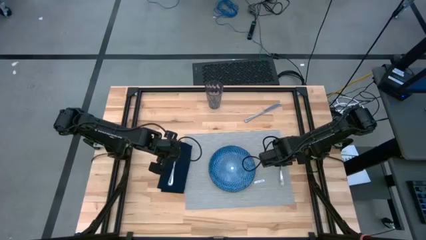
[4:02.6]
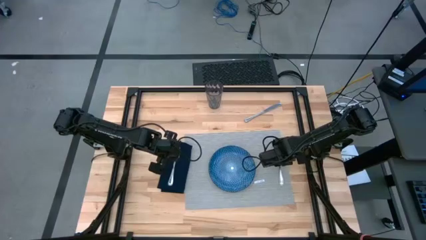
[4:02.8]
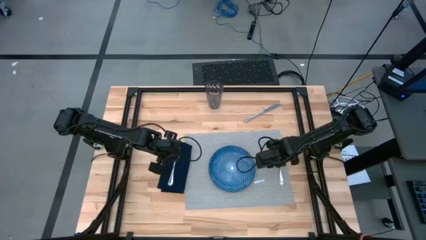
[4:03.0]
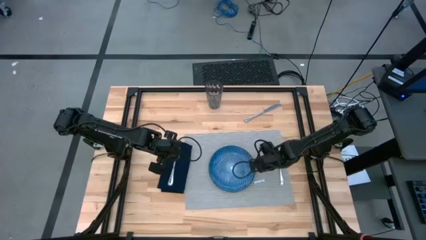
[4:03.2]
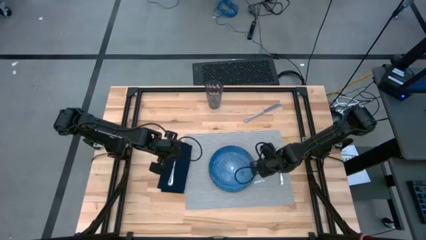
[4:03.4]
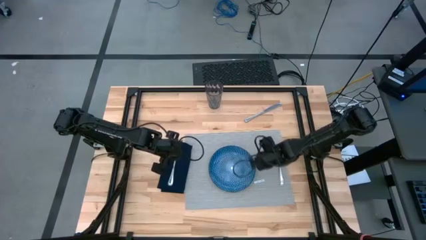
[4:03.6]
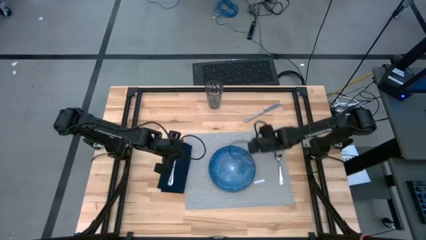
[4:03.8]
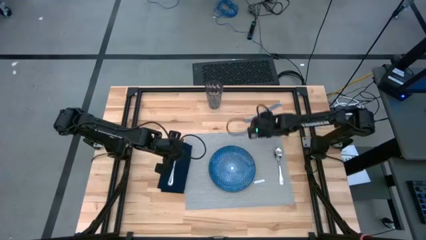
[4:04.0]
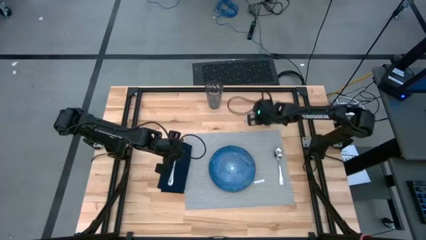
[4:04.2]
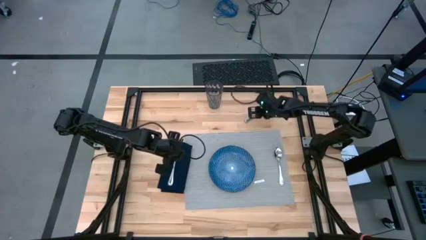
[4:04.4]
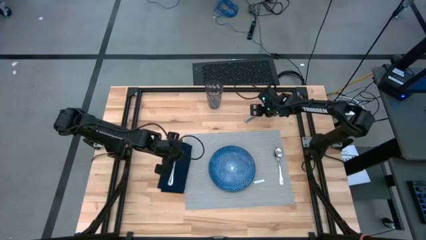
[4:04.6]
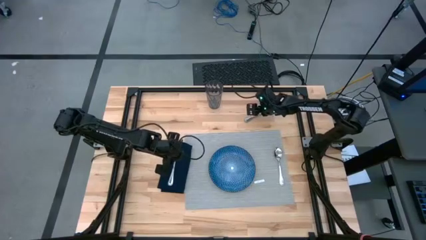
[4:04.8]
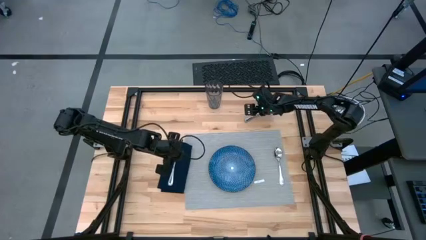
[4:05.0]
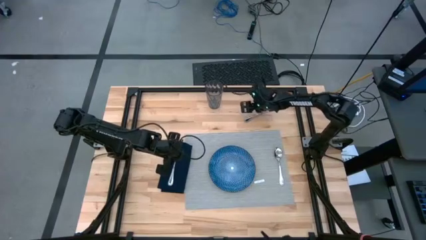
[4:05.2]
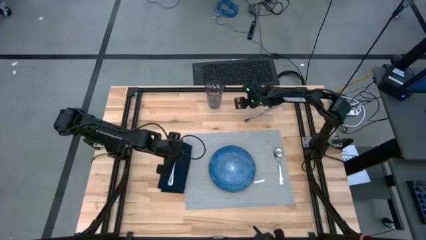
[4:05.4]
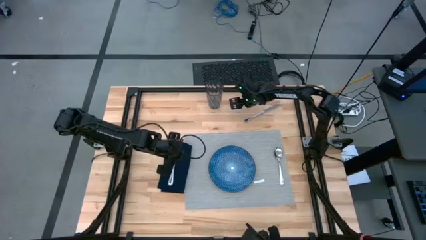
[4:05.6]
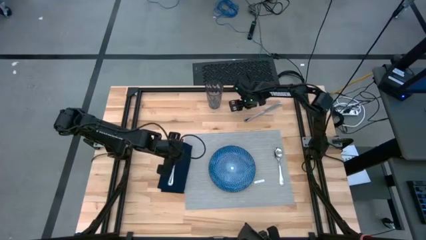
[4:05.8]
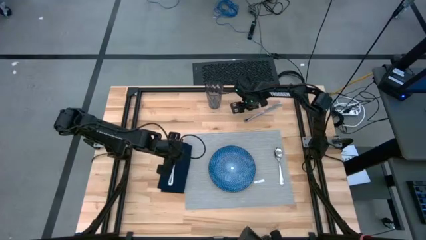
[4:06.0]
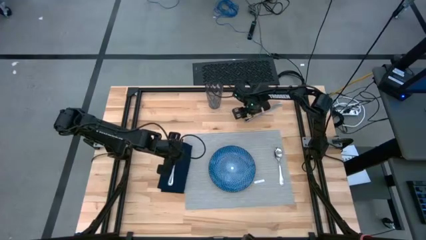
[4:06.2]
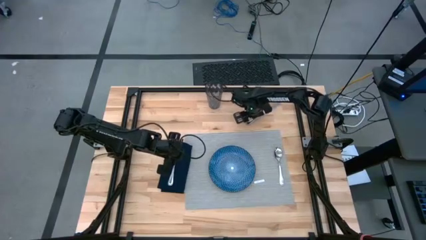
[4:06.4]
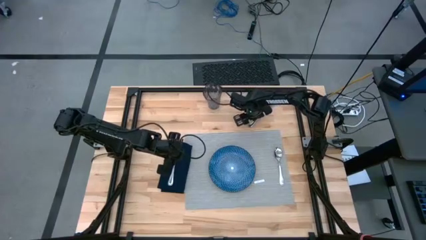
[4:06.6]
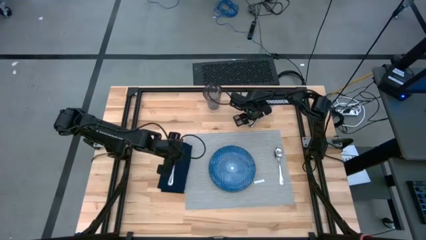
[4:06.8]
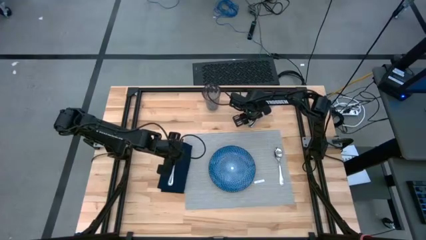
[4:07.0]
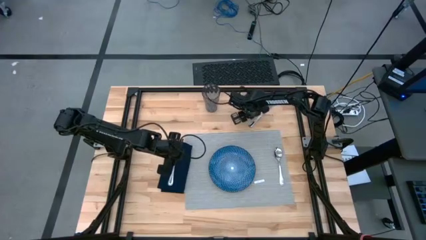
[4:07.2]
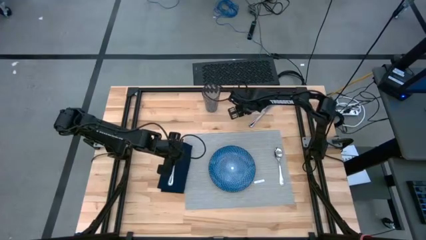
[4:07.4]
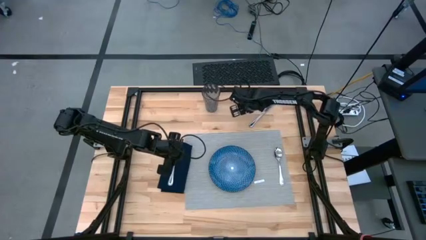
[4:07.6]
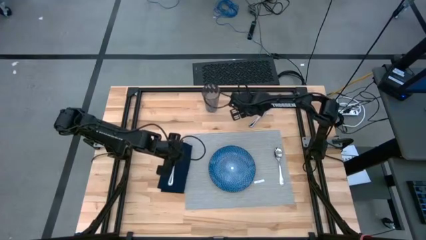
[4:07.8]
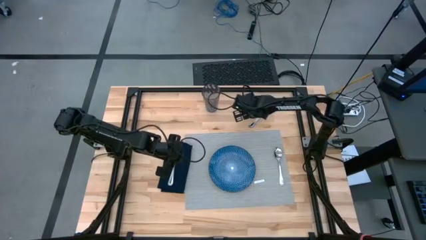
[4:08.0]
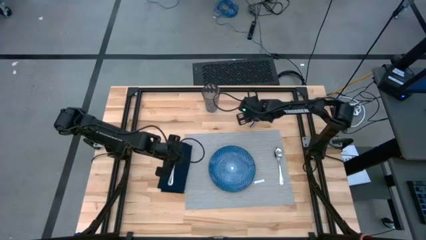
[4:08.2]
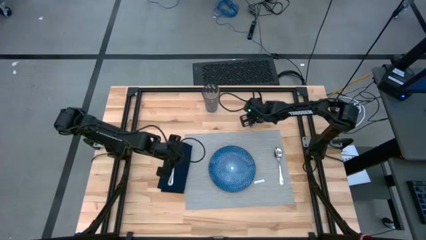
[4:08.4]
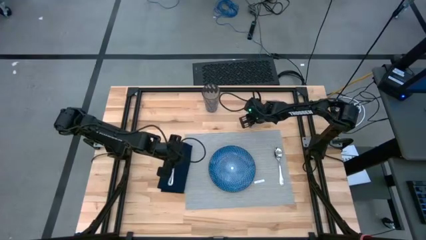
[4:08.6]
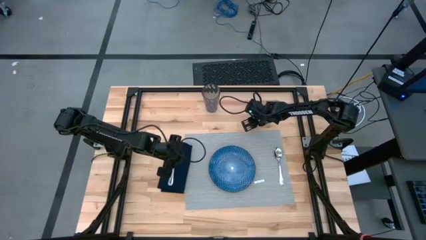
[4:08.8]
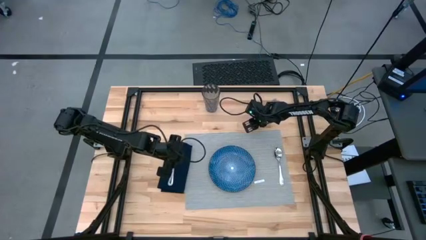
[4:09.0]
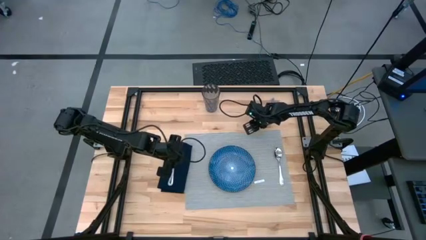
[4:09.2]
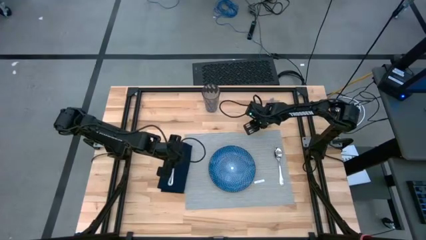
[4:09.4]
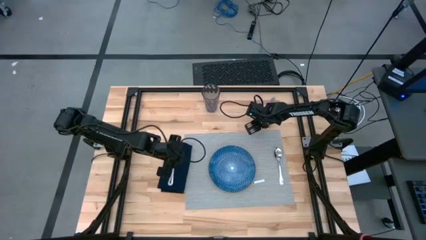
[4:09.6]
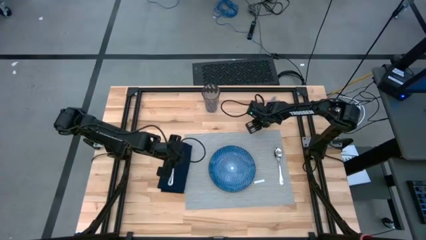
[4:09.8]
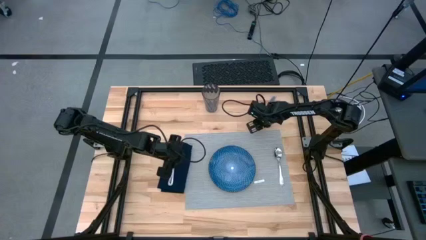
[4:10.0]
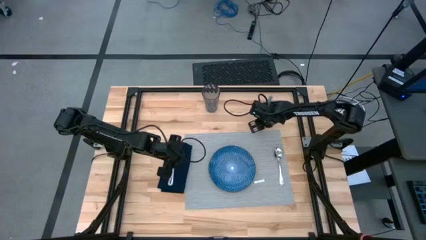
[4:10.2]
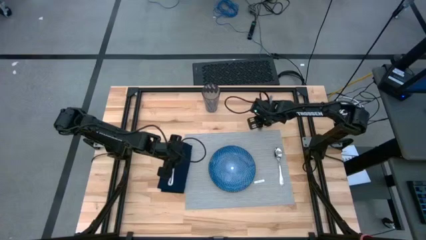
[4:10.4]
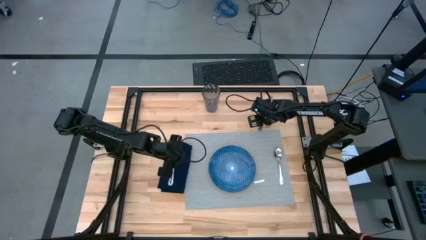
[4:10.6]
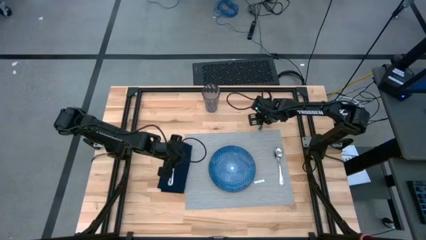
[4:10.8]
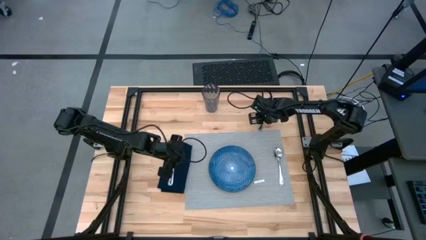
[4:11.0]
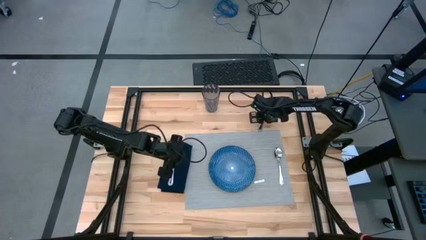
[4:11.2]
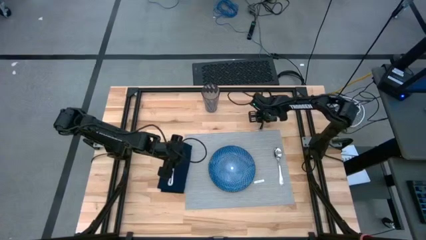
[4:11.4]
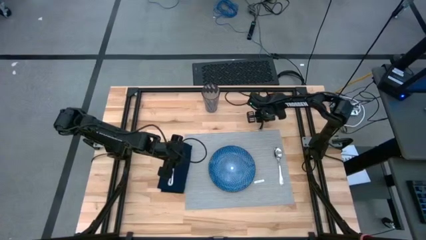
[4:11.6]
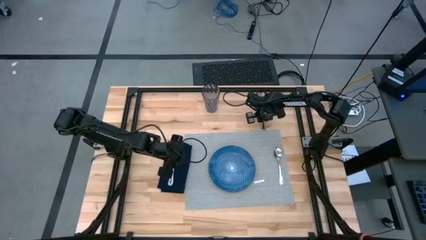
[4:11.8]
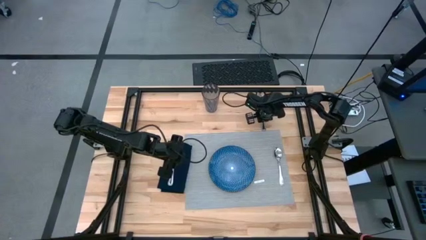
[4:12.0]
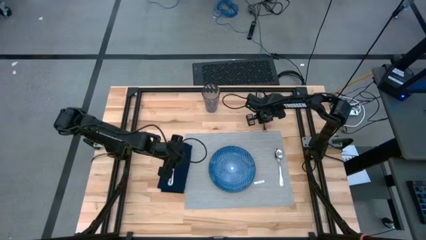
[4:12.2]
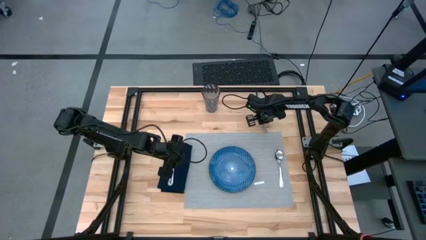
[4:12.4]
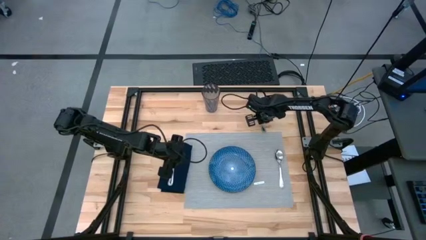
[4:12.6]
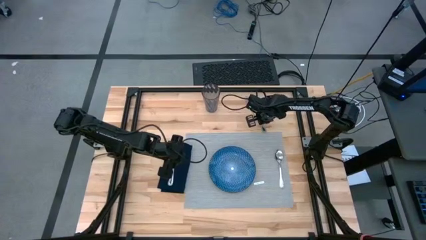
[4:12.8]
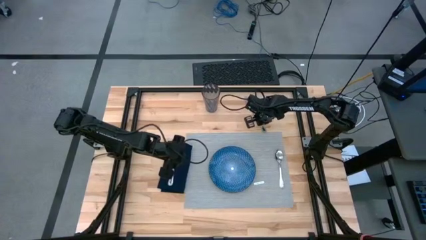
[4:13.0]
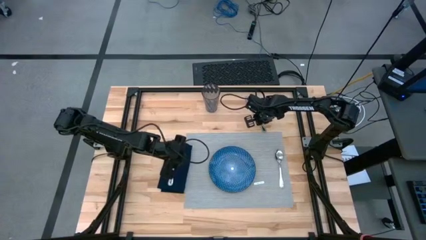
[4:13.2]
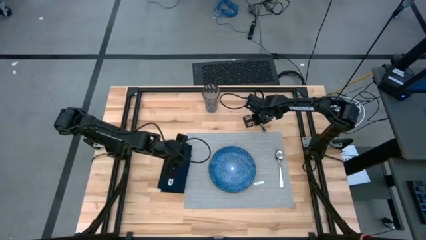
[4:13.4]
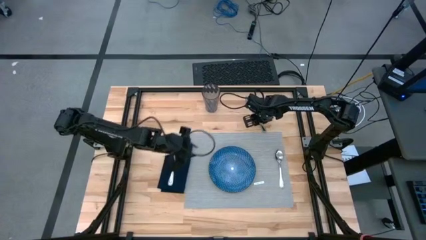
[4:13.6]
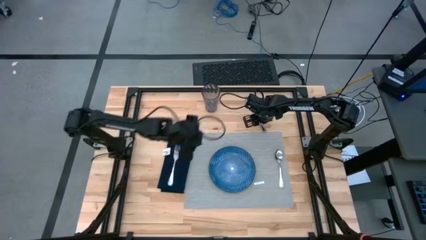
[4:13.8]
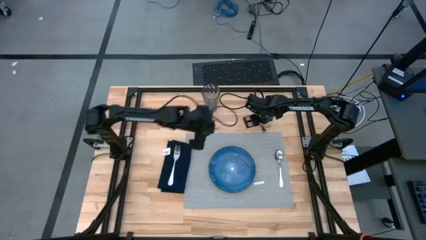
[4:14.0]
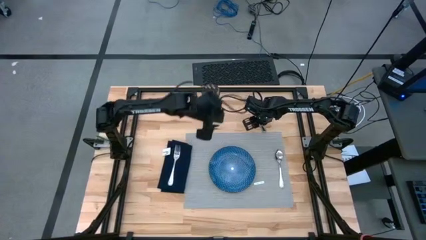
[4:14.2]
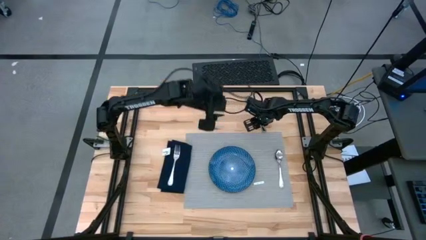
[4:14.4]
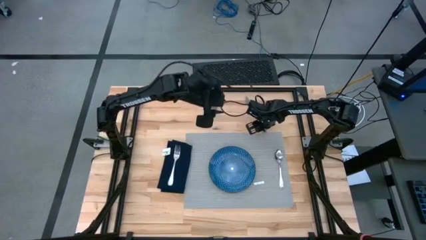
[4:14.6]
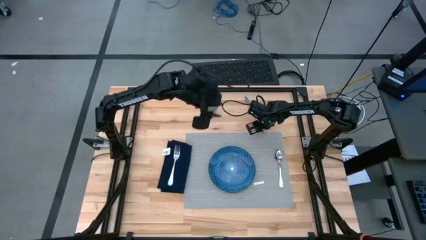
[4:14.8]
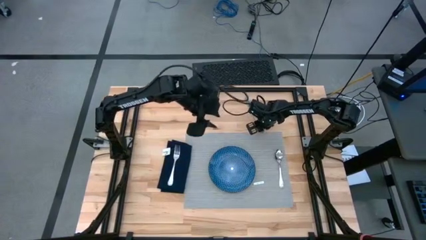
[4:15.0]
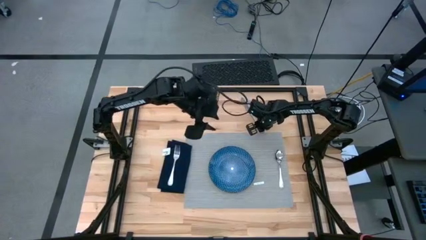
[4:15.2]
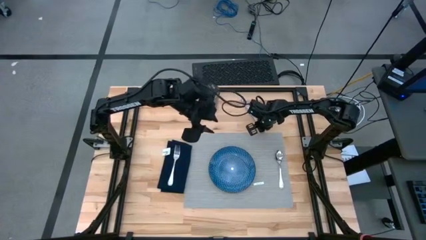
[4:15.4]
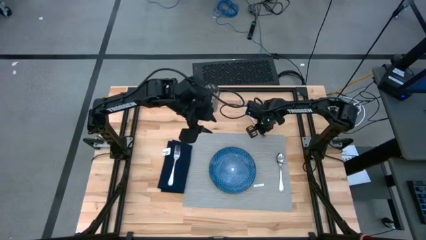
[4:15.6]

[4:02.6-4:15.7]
Task: Set table place
Put the silver knife to the left of the silver spoon on the gray placemat

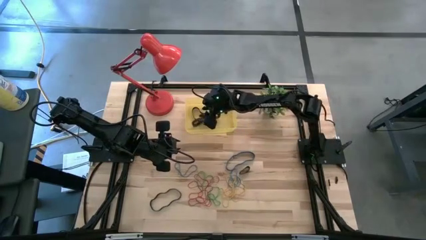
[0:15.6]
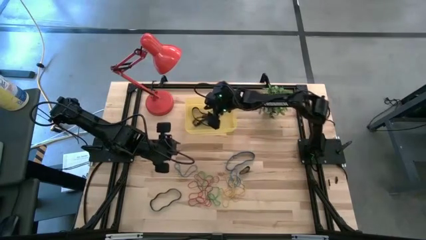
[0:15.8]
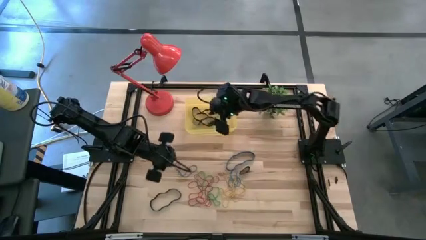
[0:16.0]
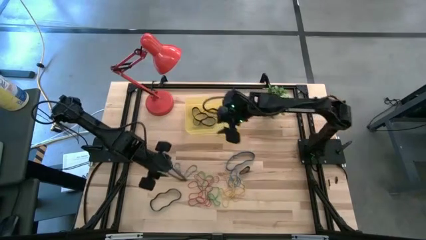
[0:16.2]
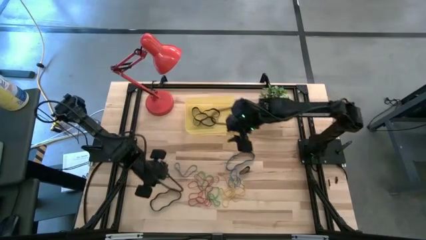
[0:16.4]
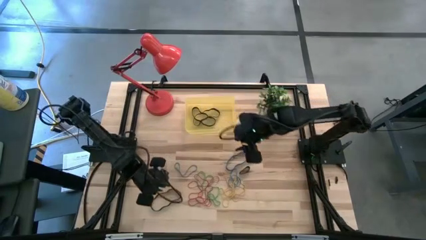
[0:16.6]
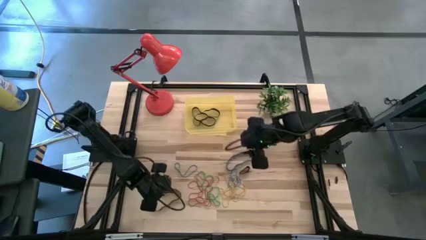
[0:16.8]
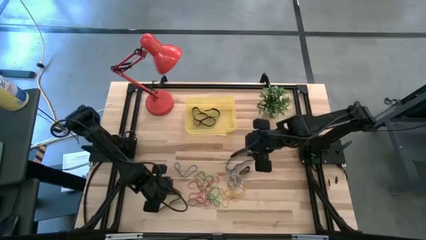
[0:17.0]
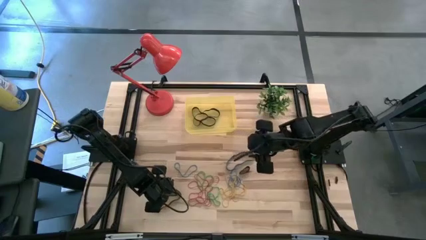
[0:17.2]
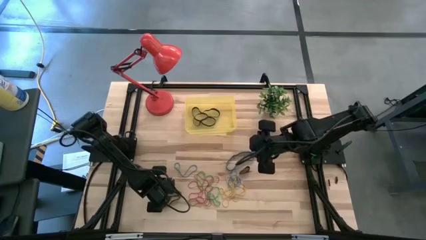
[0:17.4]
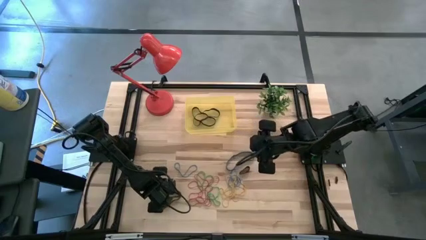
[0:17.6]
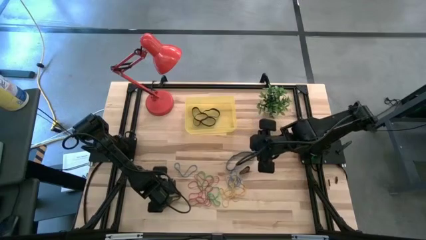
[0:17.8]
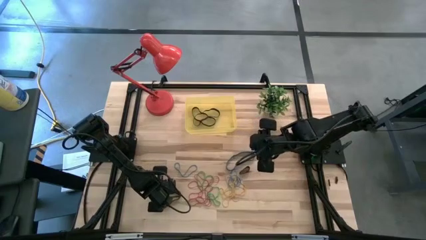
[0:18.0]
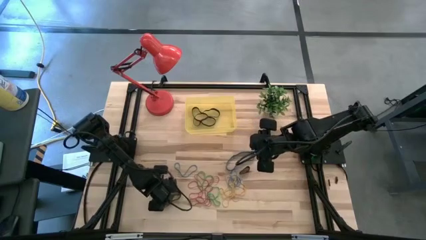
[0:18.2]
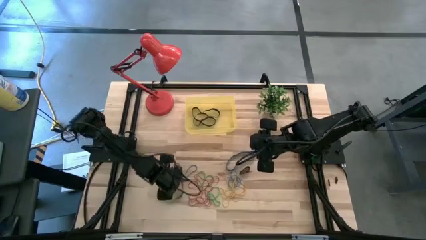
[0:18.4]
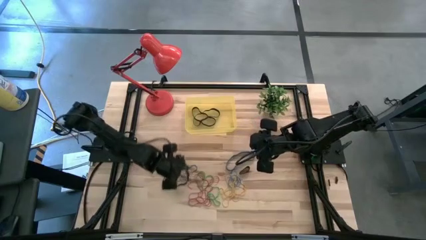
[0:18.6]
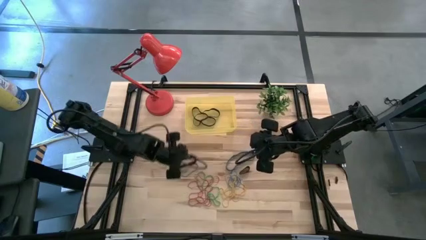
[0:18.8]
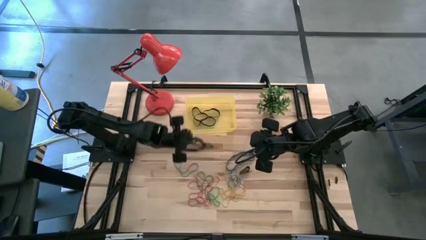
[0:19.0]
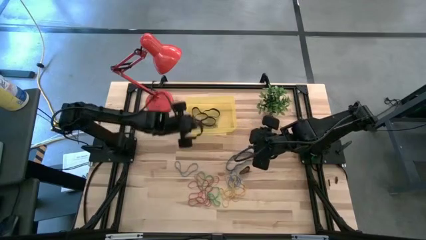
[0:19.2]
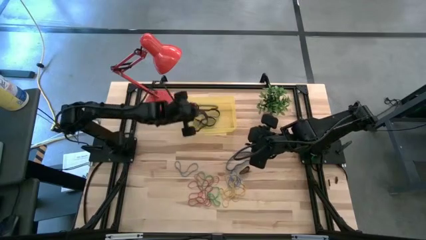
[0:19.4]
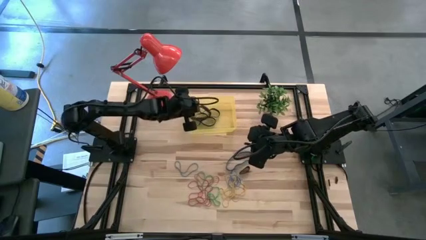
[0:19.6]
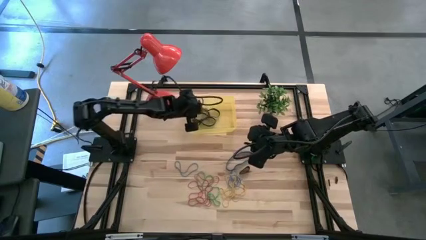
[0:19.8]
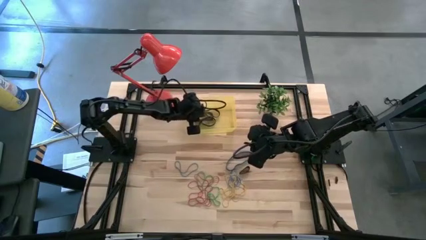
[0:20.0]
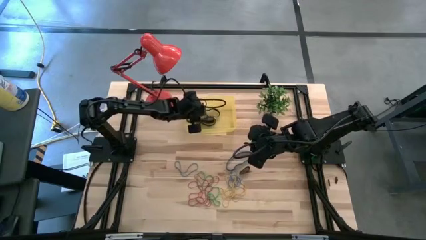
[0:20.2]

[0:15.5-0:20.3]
Task: Pick and place rubber bands into bin
Put the black rubber band into the yellow container
